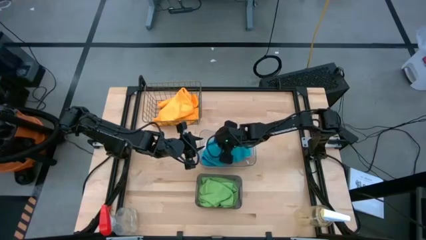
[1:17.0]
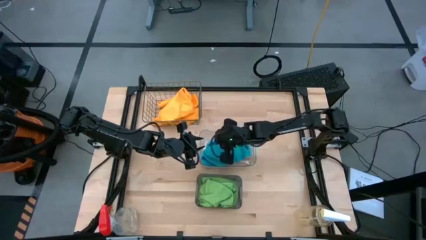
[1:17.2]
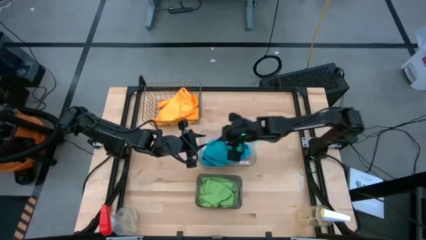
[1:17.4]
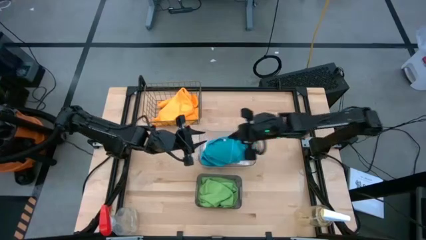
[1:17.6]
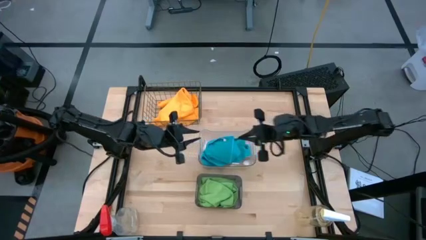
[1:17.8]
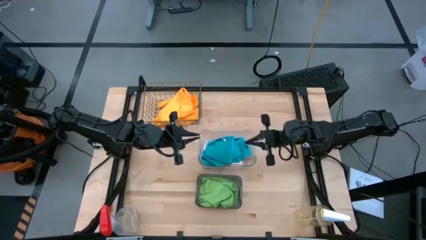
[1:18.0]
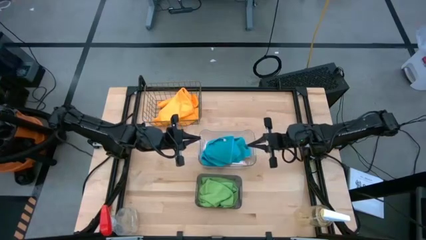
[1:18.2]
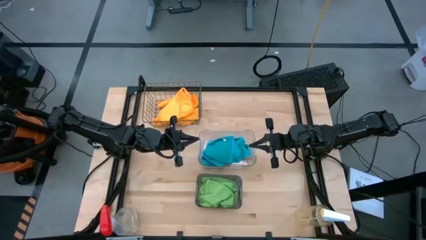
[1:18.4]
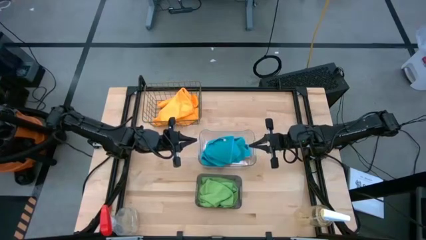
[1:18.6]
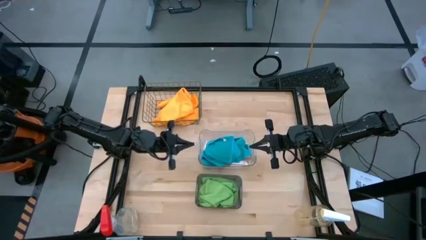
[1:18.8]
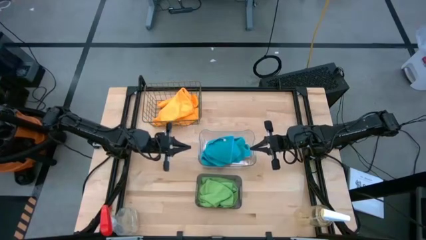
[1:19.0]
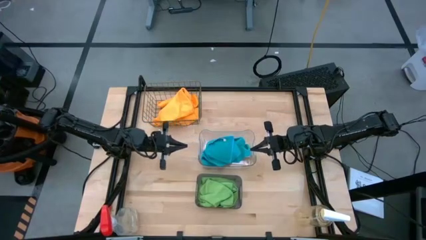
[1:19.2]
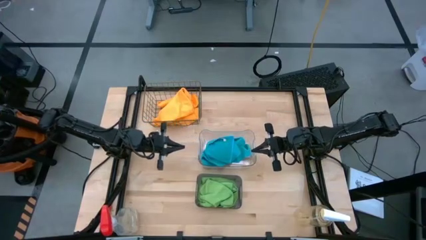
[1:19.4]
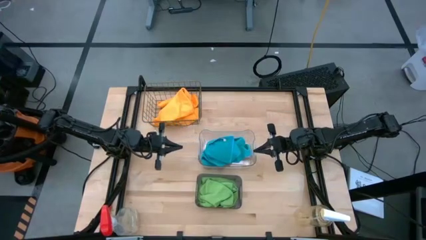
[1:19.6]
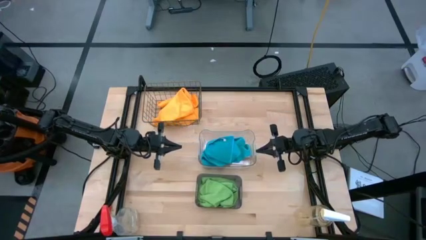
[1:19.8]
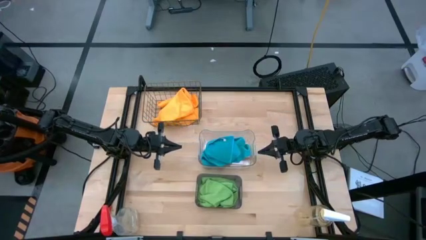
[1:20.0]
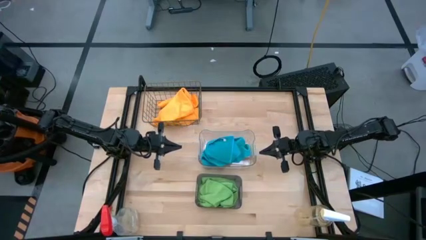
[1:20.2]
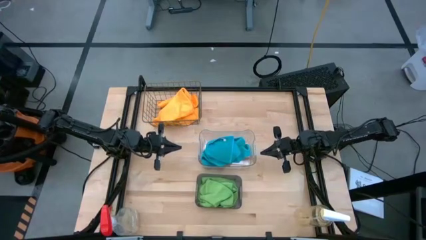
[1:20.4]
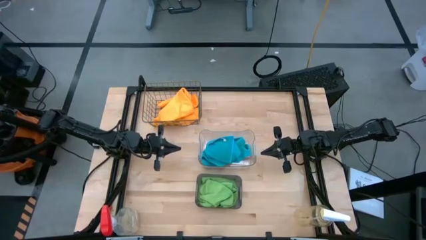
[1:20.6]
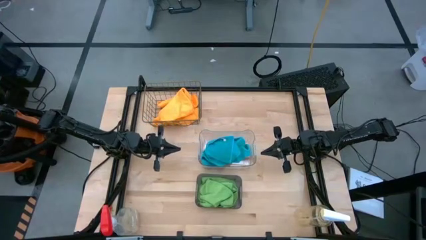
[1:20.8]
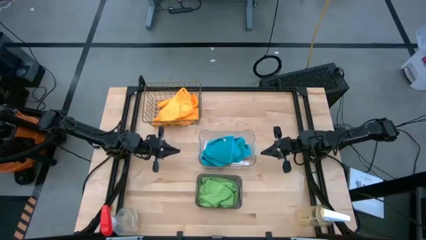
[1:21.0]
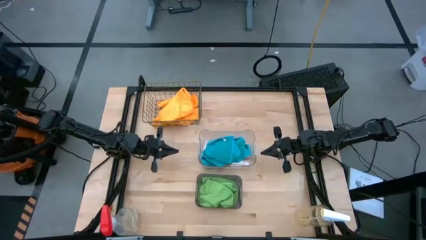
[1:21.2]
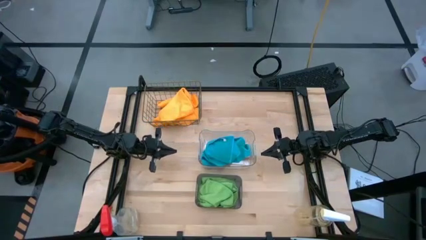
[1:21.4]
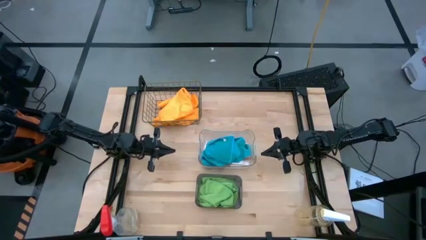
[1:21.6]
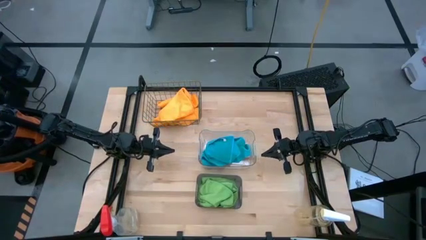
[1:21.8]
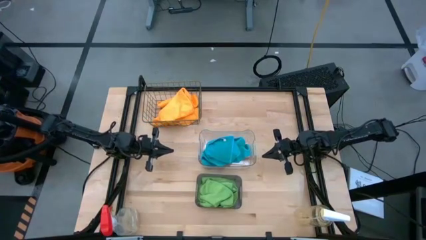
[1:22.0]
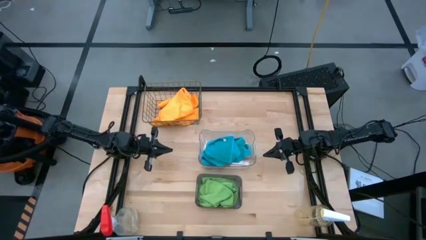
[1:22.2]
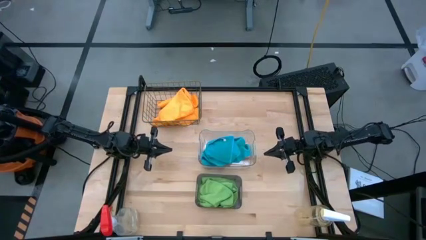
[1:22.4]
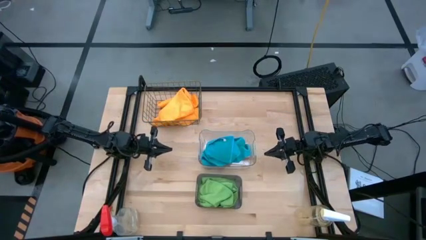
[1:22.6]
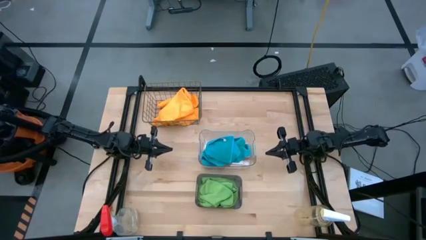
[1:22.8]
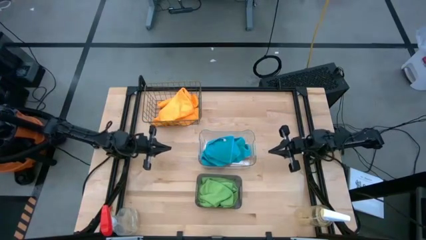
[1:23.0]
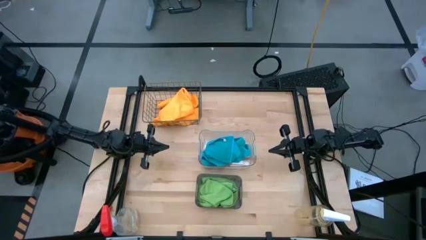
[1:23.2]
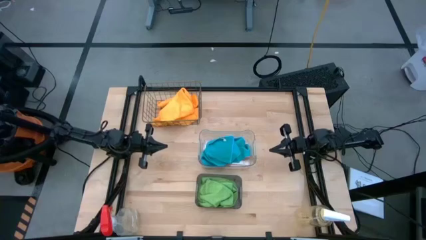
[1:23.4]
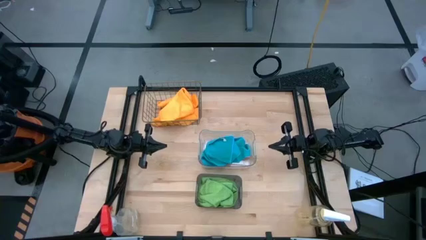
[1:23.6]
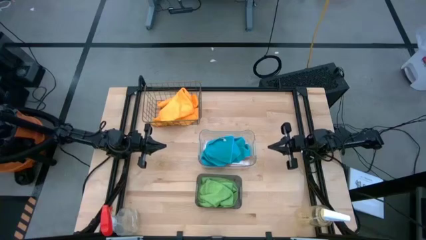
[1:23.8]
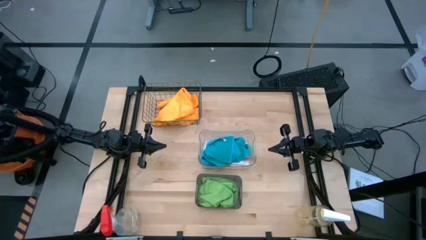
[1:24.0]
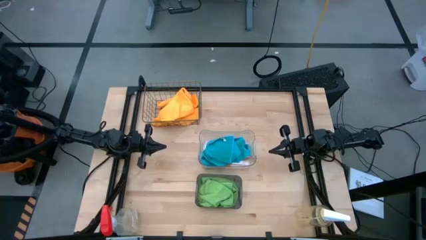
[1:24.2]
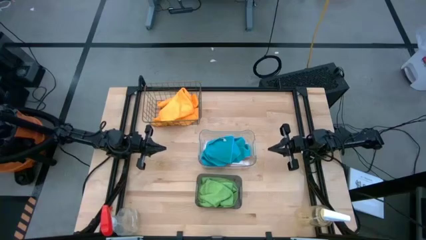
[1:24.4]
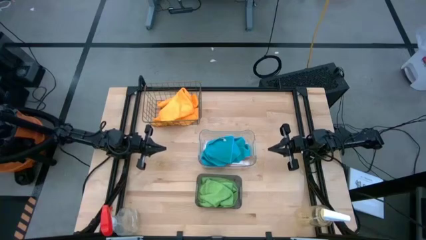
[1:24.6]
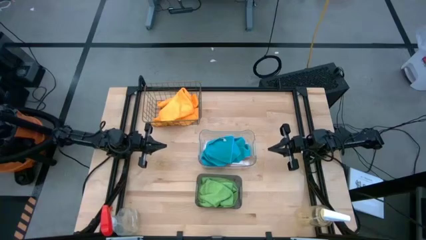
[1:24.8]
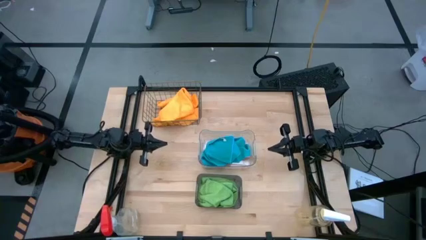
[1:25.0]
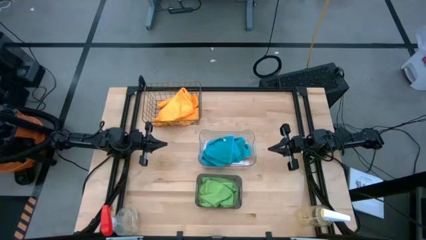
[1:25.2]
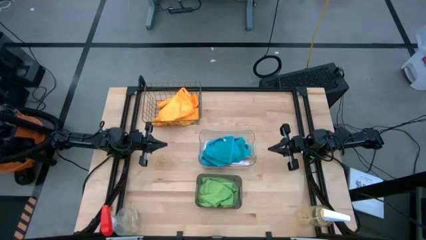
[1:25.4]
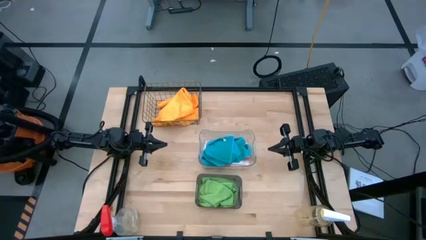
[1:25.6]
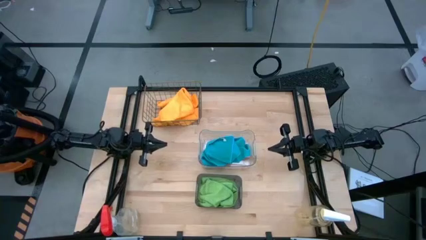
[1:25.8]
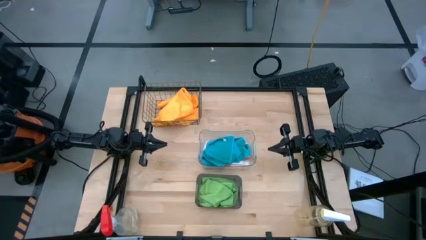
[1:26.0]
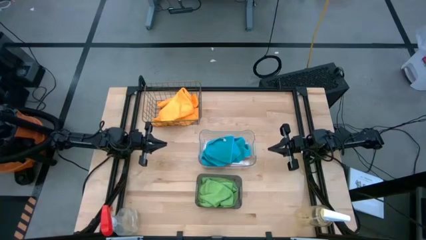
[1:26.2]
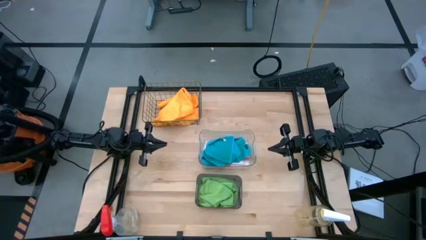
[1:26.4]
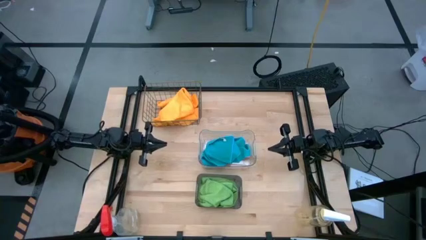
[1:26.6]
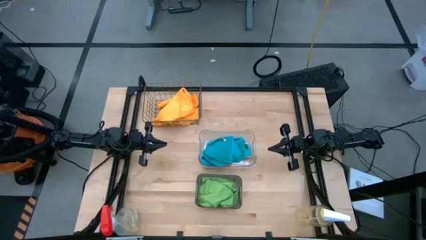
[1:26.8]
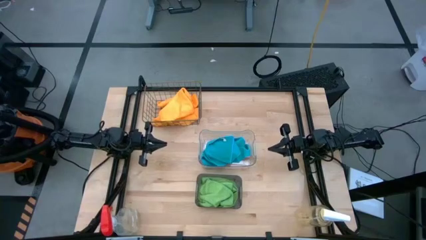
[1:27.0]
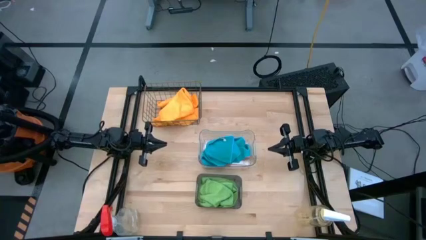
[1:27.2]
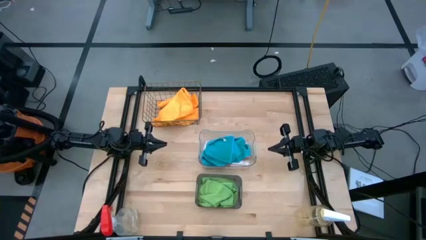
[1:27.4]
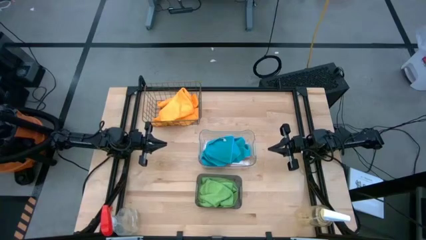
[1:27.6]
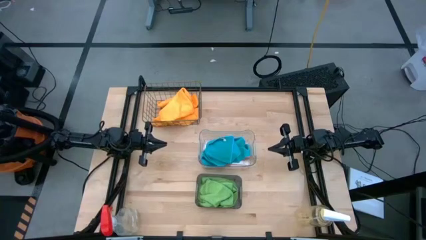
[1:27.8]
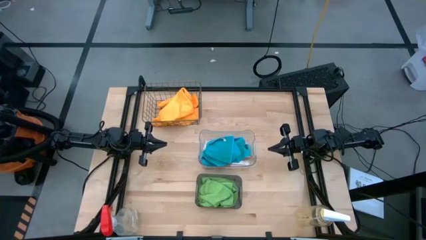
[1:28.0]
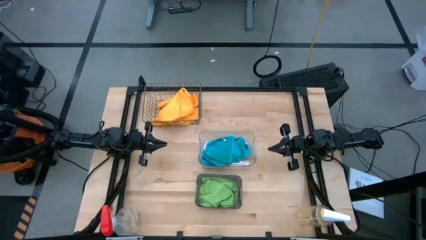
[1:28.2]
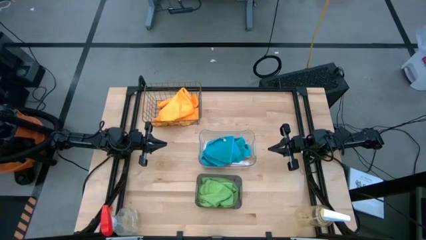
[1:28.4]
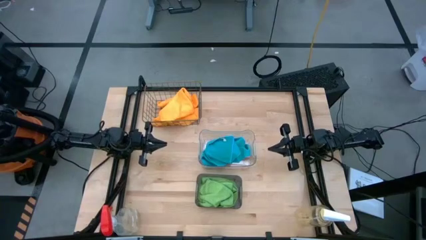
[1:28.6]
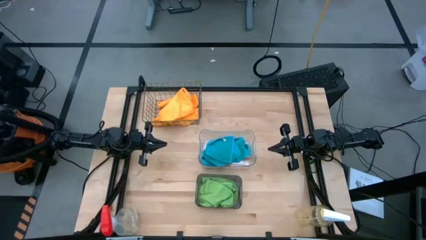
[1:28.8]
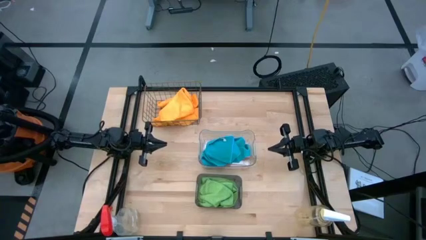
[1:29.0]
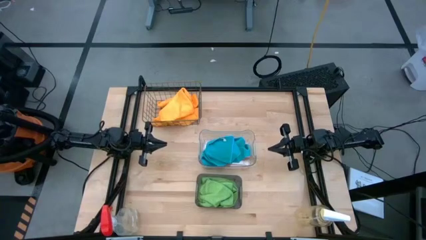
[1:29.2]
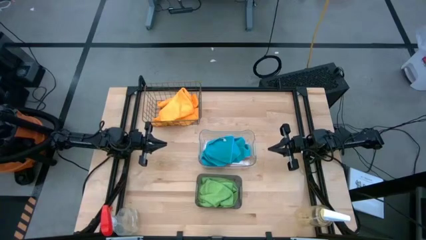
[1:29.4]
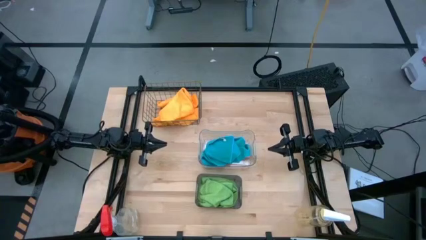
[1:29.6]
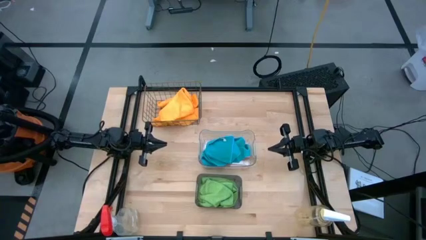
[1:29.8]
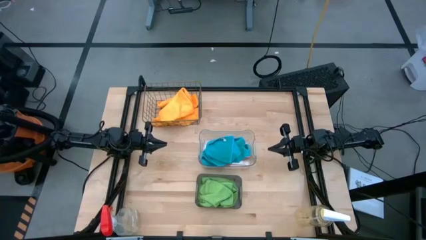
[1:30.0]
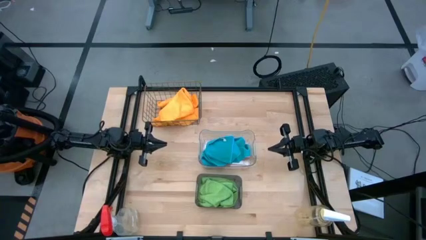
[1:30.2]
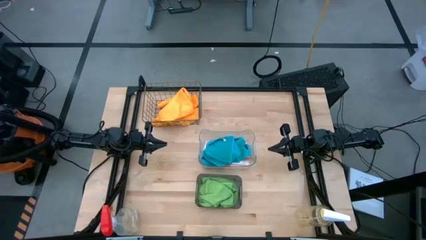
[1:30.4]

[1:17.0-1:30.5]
Task: Sort microfiber towel by color & place in baskets
Return to Home Position

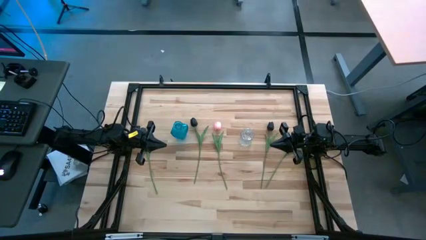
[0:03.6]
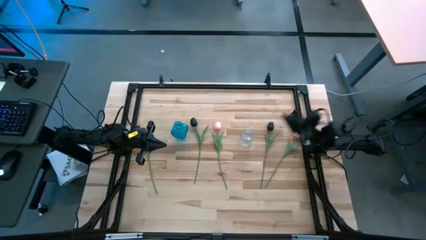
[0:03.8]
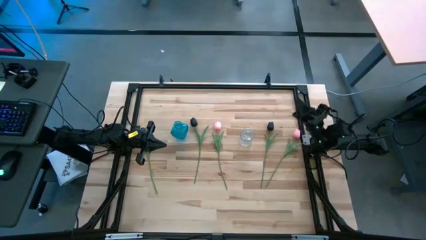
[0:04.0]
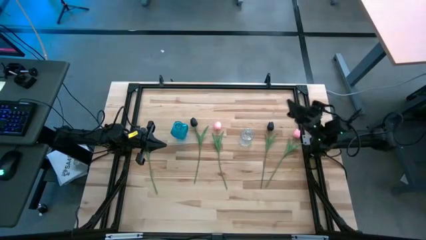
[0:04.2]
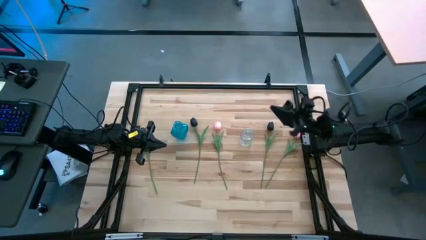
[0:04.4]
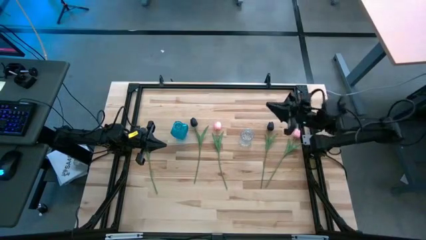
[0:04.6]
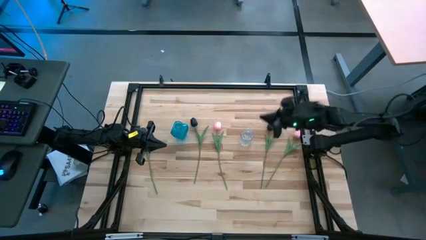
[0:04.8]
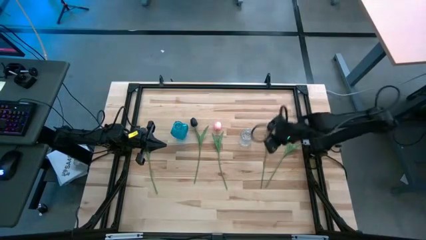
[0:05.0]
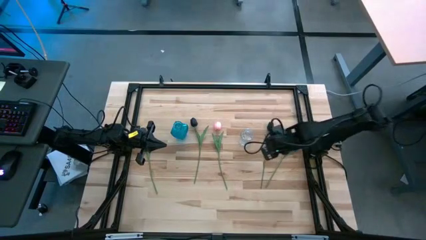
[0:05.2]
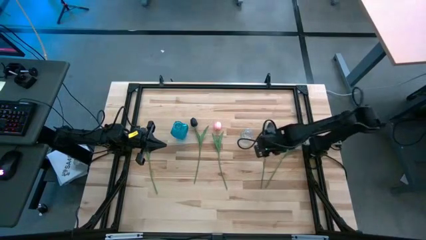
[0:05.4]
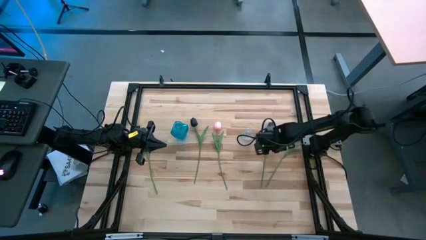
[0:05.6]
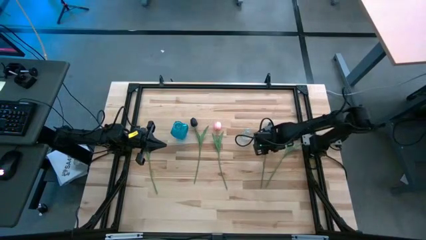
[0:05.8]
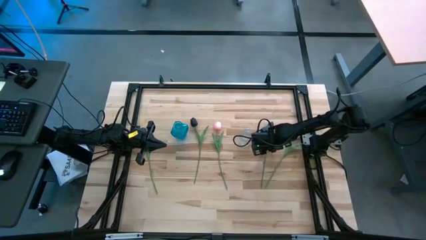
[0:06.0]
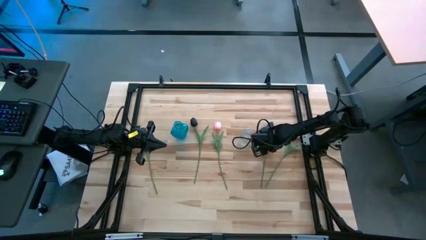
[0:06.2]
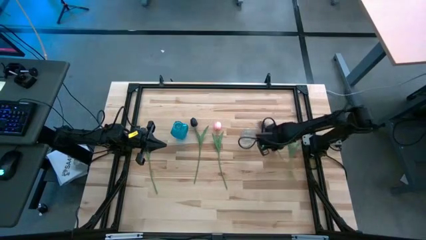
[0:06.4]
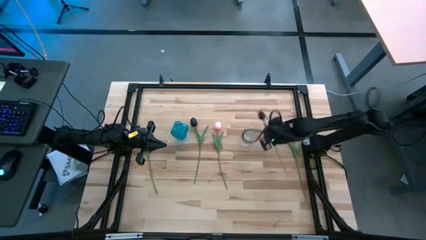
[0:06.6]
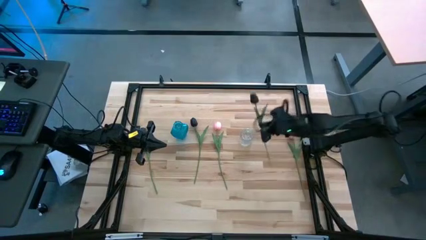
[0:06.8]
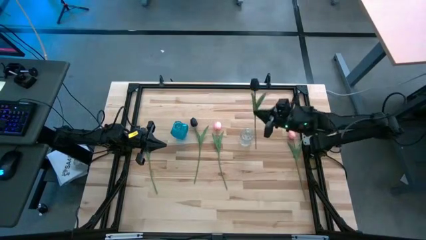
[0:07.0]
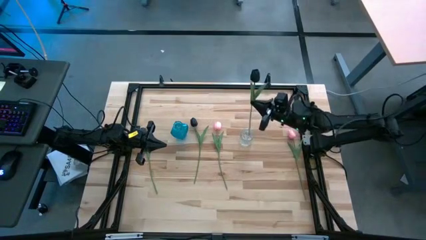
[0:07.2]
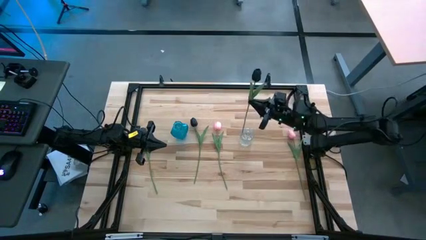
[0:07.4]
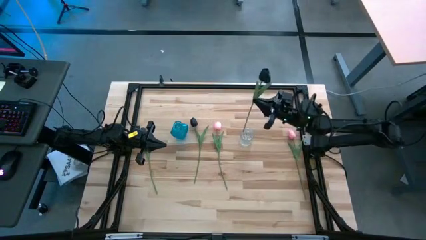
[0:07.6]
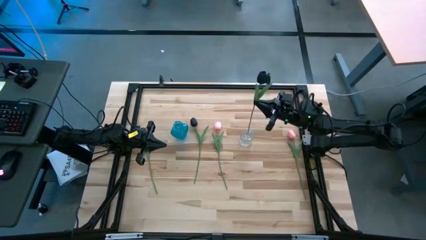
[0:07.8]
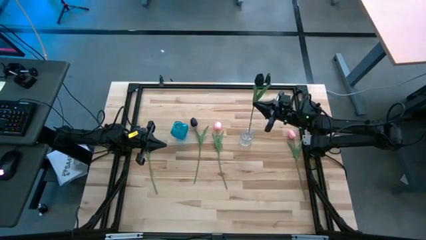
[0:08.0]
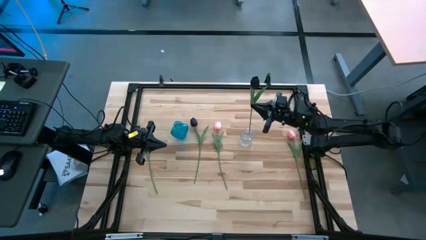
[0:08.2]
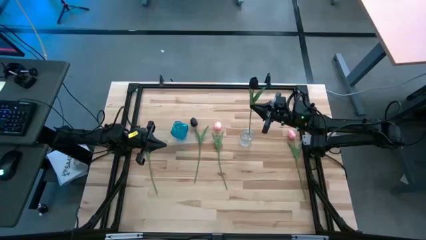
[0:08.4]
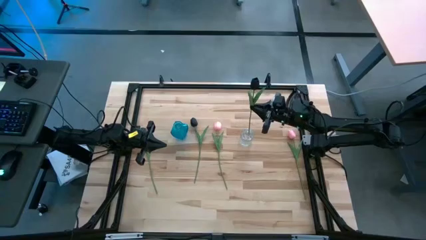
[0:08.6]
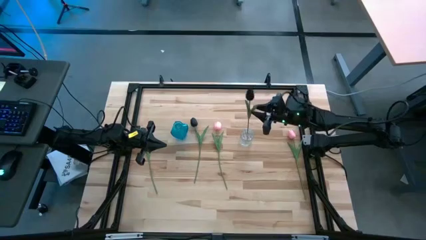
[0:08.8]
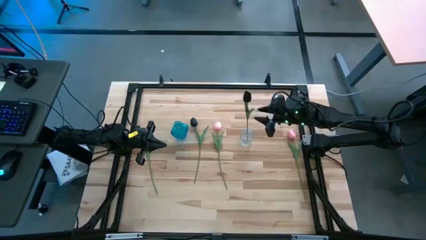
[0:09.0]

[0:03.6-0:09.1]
Task: Sort flowers into vase by color
Put the right black flower into the transparent vase
